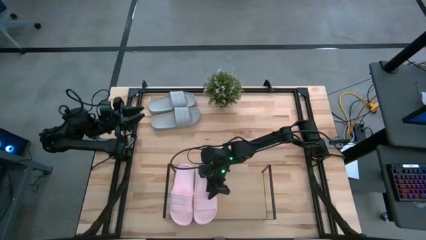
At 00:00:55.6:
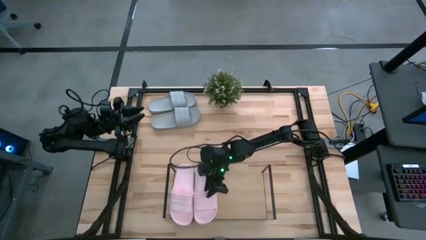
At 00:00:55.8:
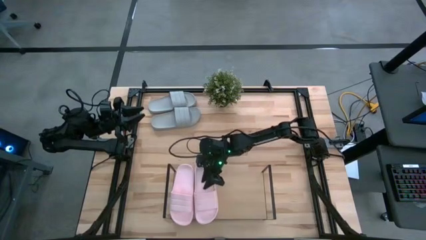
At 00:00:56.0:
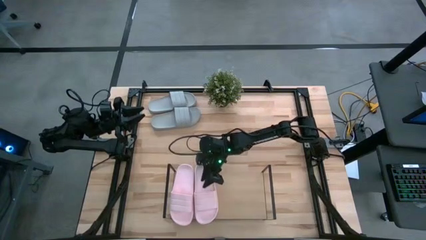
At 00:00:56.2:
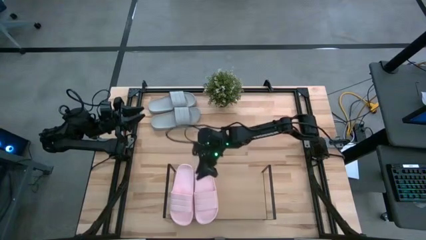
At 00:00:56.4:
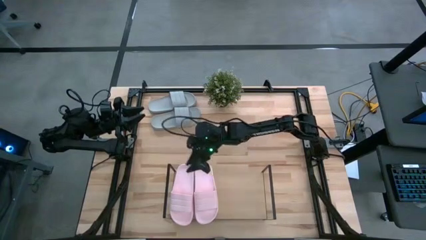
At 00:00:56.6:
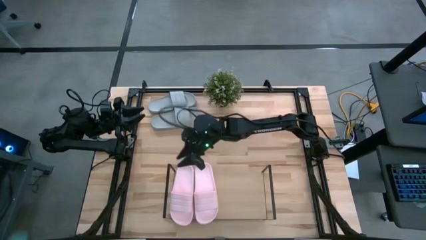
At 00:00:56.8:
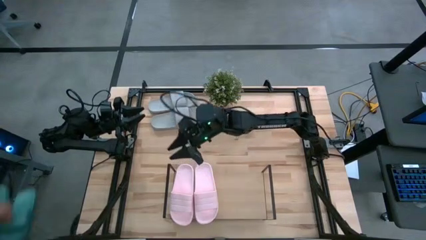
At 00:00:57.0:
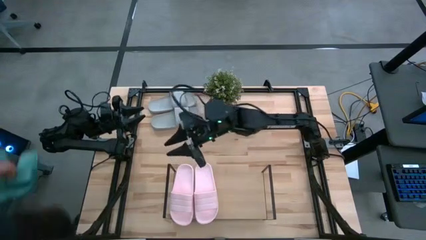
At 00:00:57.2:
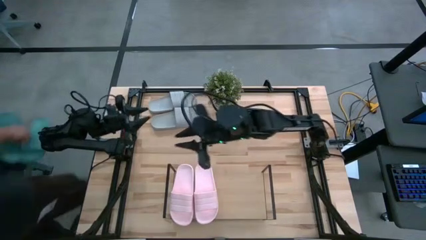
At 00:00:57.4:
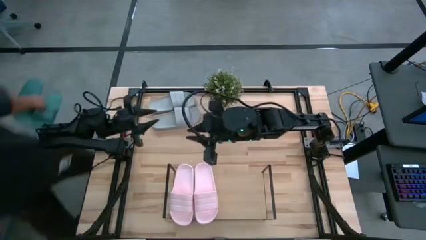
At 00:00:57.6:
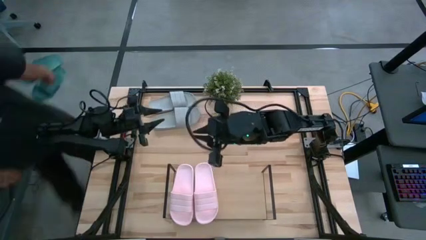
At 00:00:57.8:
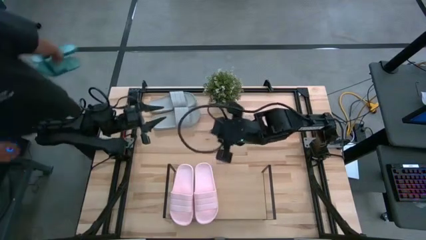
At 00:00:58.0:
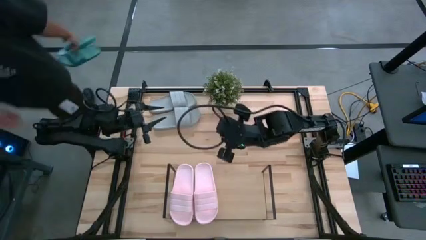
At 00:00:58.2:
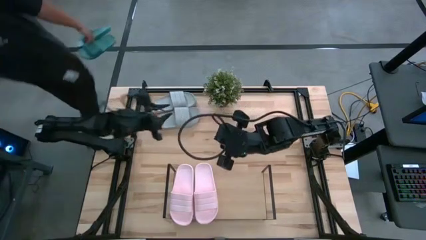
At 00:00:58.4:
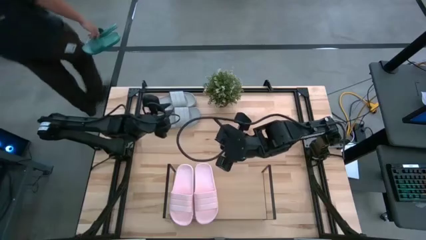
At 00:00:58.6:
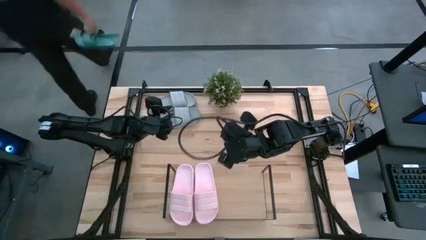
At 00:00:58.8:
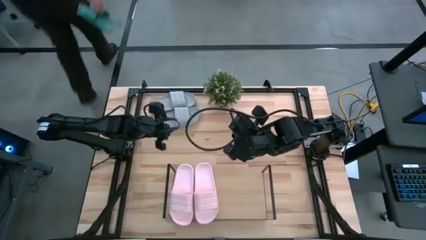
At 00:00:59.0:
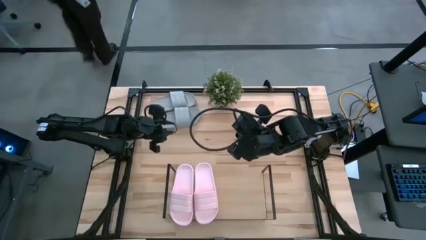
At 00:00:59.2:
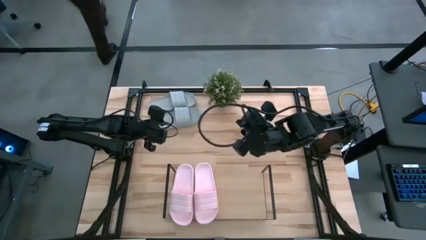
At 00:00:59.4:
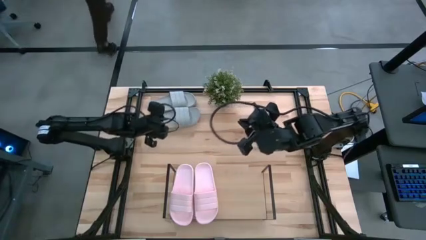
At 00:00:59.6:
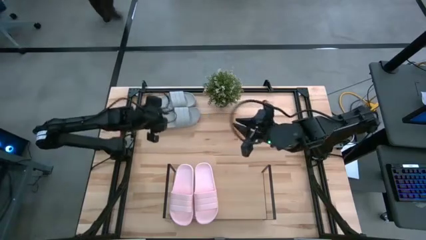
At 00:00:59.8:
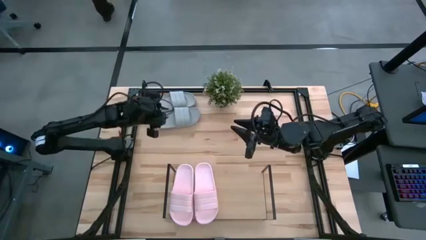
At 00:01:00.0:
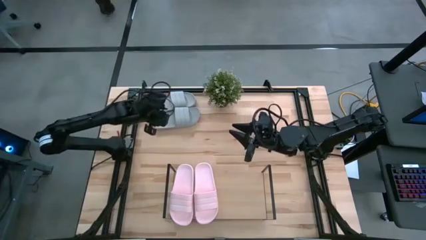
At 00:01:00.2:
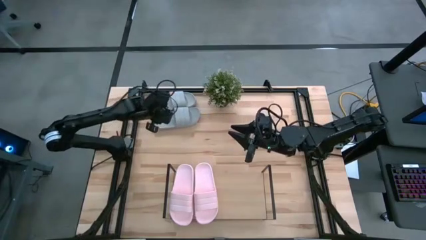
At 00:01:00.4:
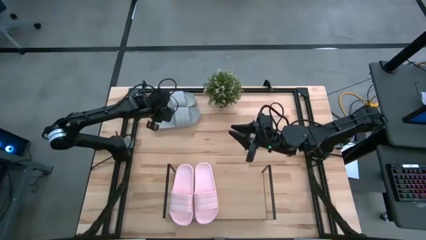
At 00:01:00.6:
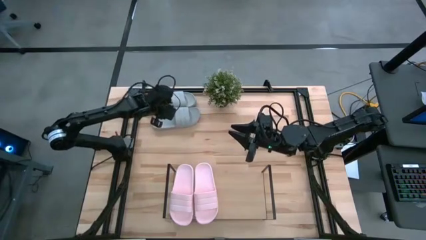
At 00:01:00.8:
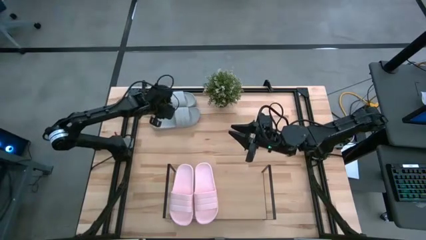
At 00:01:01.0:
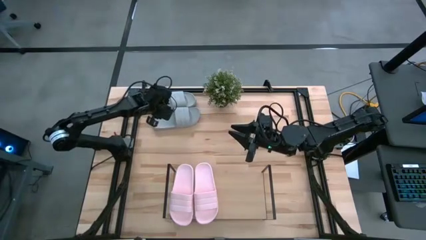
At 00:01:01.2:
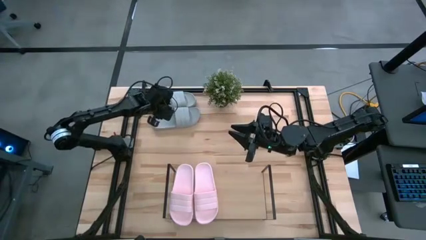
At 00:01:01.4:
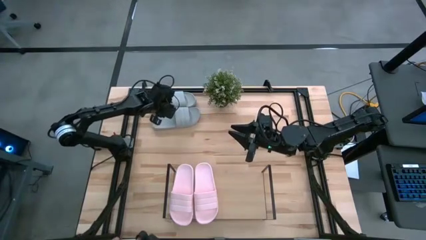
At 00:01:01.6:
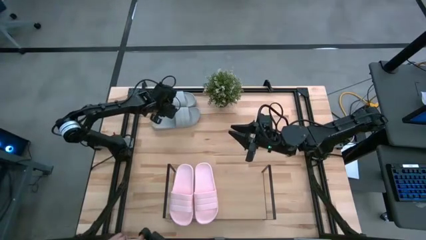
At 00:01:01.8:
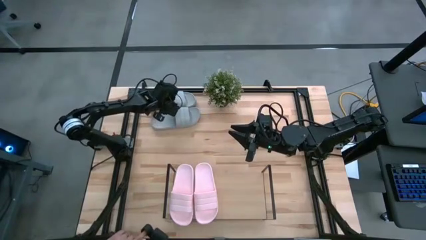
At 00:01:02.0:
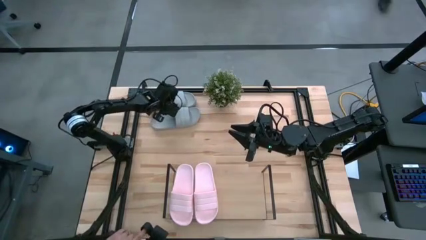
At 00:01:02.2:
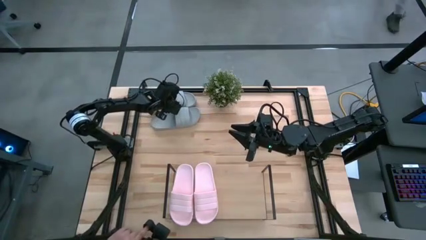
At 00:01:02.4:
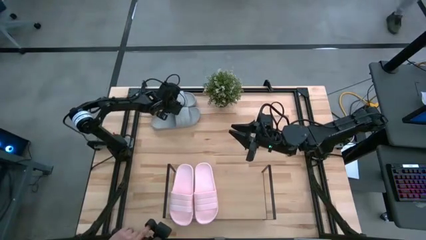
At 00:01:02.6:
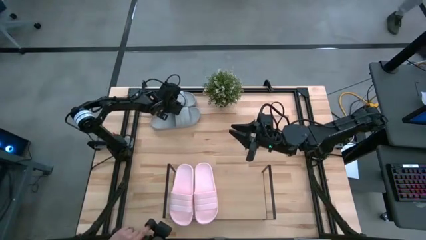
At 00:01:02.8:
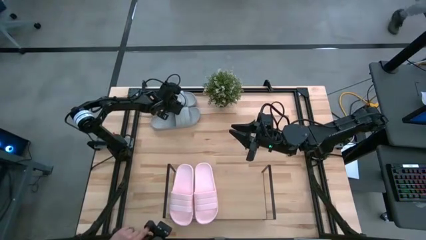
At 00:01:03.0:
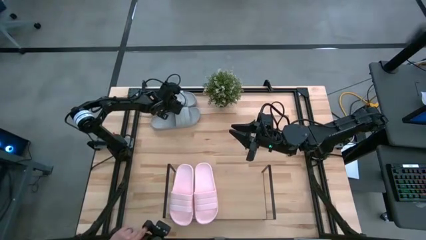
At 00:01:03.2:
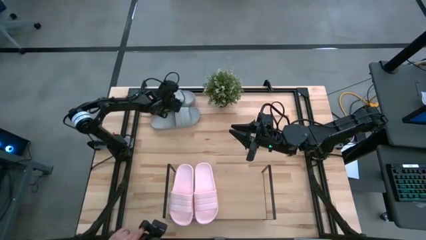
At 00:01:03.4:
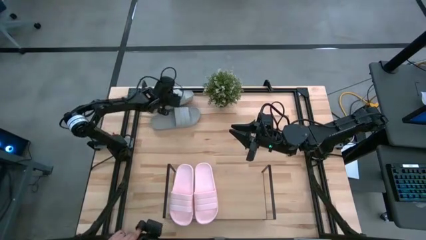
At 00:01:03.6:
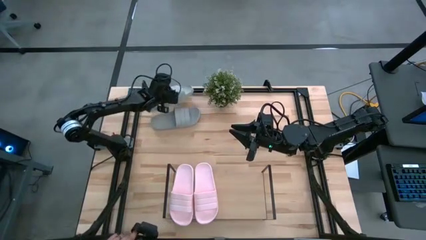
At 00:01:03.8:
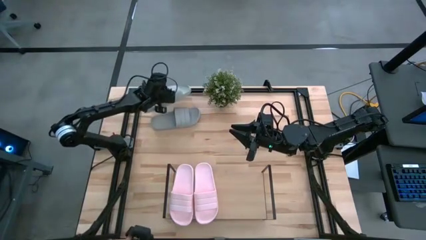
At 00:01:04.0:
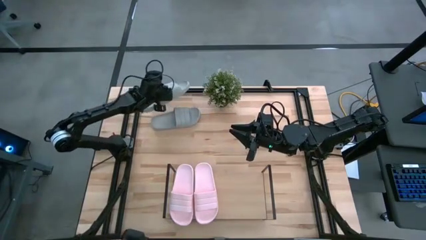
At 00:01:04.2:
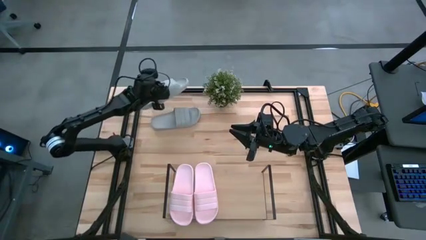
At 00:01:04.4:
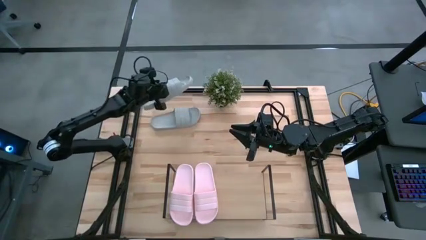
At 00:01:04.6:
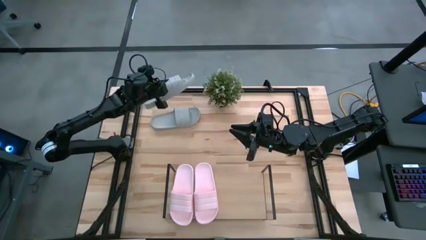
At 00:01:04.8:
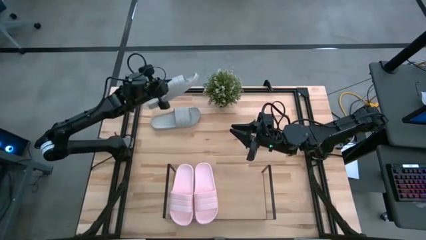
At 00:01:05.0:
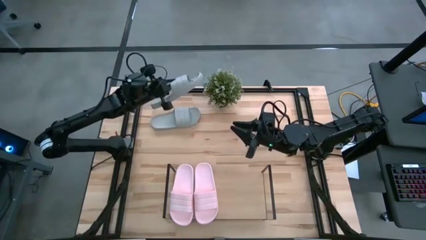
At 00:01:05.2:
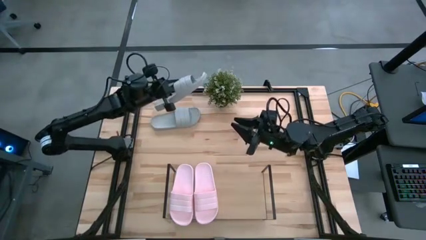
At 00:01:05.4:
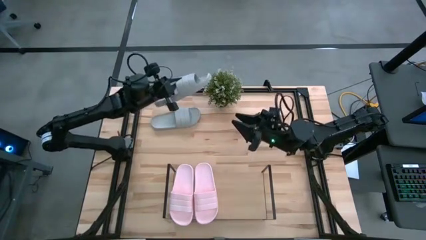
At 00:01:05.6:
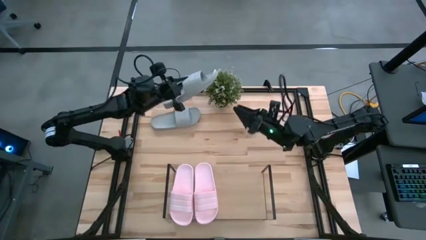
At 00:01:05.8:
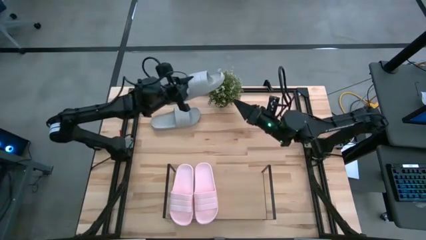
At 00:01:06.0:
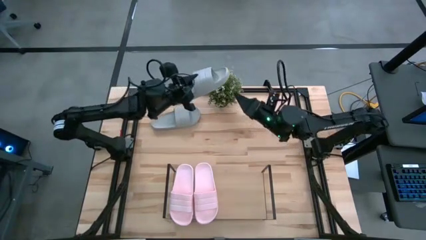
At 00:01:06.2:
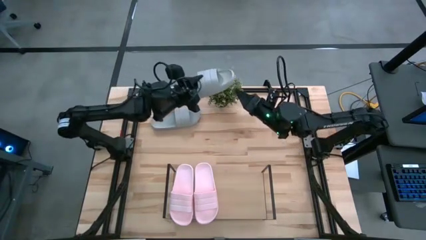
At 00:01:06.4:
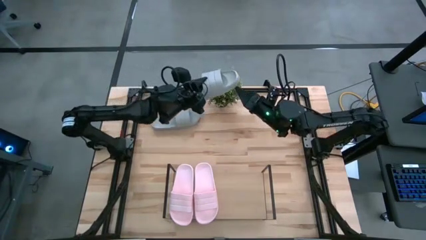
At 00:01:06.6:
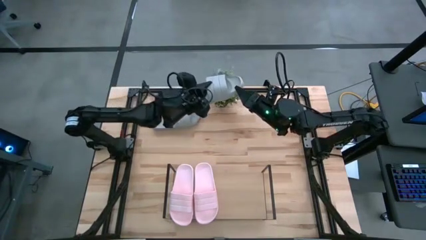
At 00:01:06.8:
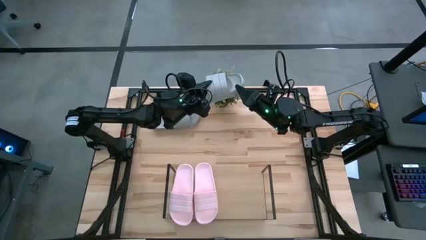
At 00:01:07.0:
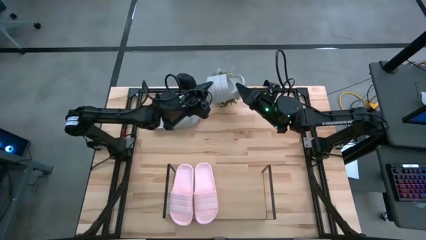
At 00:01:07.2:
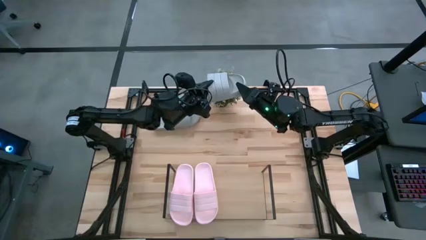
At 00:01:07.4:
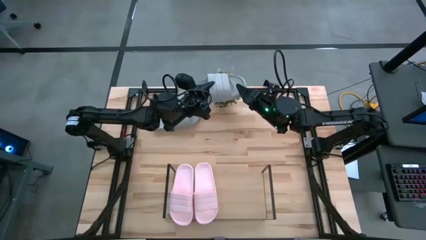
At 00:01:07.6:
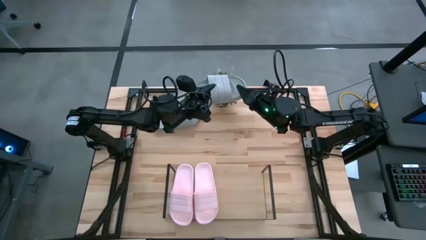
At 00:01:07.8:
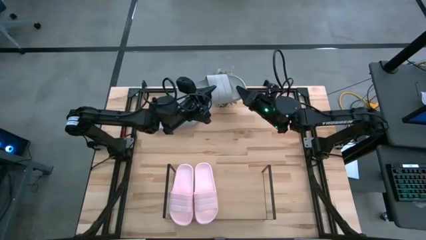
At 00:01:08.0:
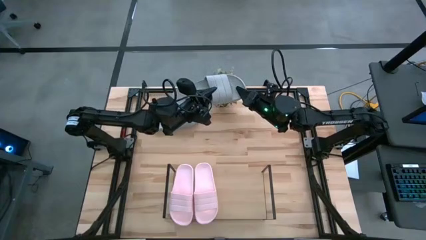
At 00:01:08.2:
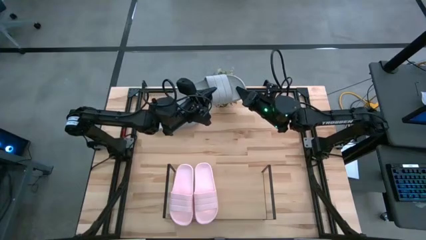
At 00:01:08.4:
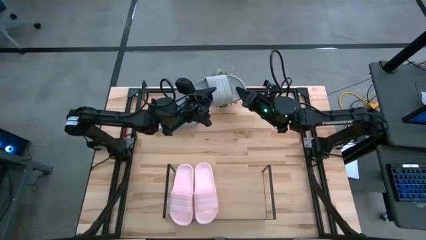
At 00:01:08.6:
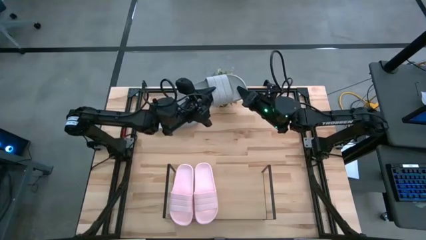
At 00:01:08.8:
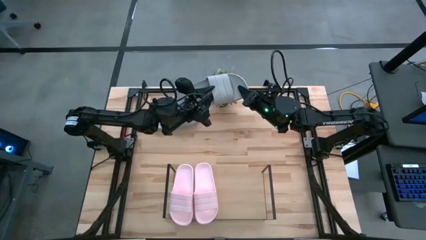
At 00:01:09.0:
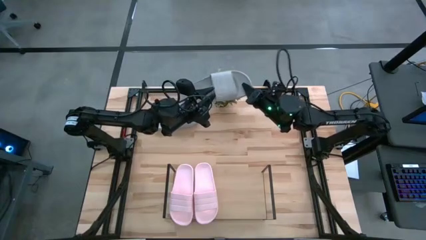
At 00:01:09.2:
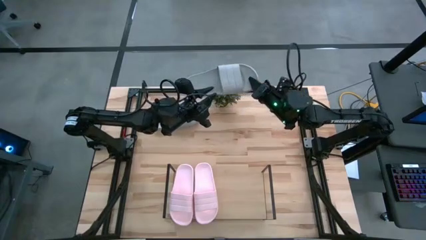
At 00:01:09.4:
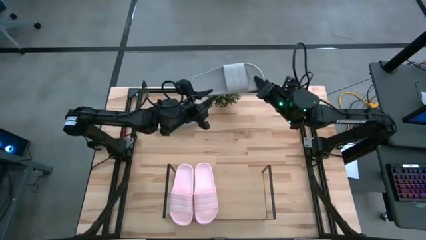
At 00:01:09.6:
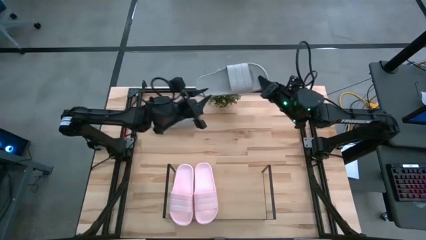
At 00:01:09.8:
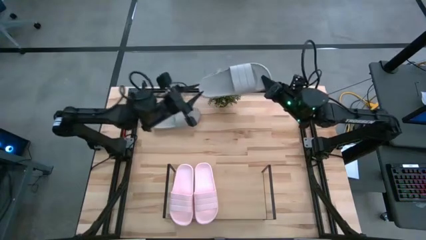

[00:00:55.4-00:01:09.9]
Task: Pick and place slides into the shelf
Put the top gray slide on the shelf
